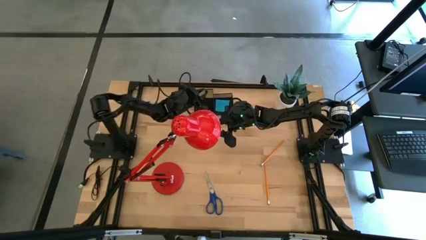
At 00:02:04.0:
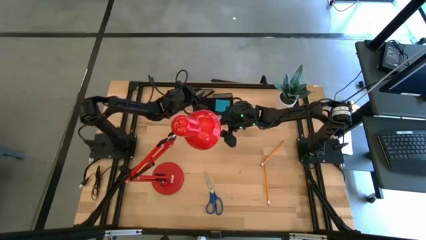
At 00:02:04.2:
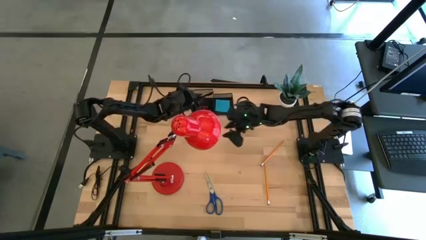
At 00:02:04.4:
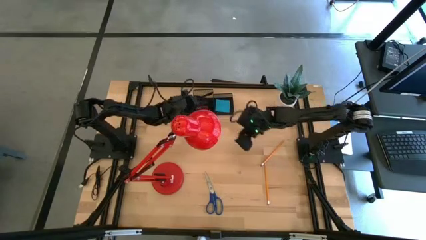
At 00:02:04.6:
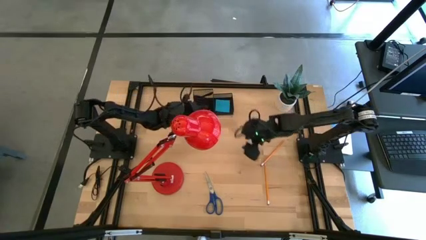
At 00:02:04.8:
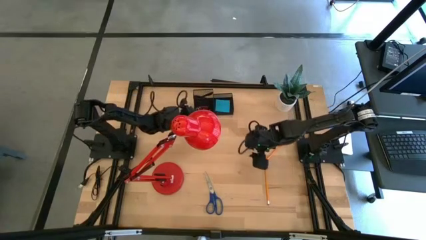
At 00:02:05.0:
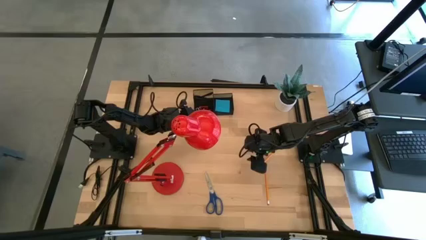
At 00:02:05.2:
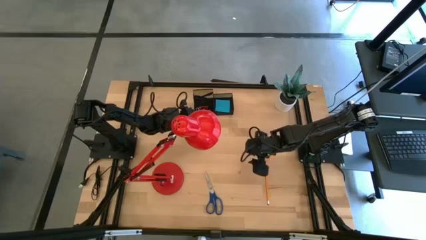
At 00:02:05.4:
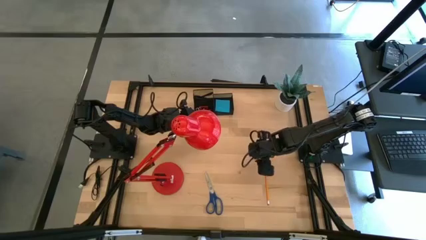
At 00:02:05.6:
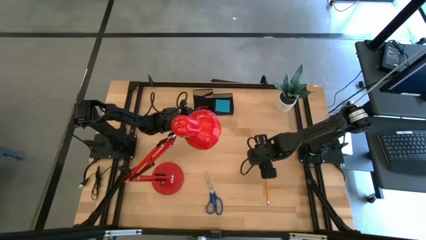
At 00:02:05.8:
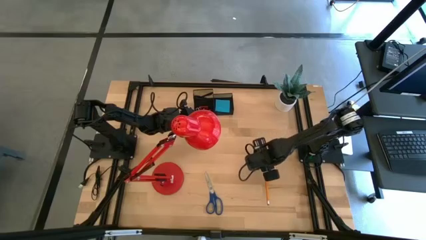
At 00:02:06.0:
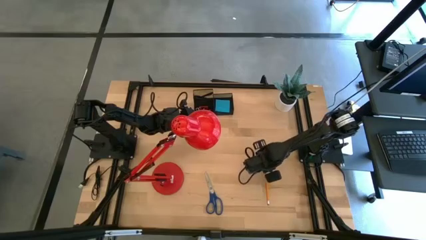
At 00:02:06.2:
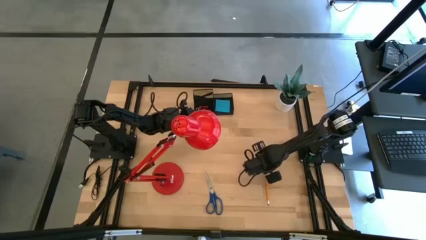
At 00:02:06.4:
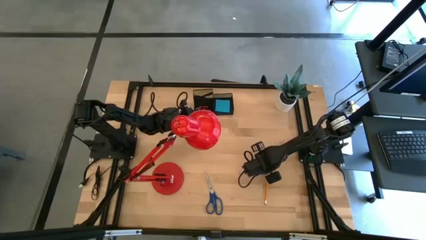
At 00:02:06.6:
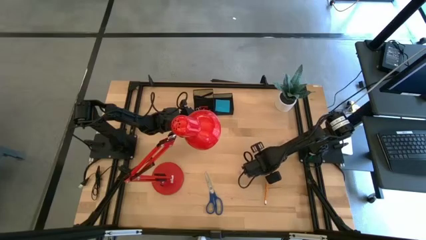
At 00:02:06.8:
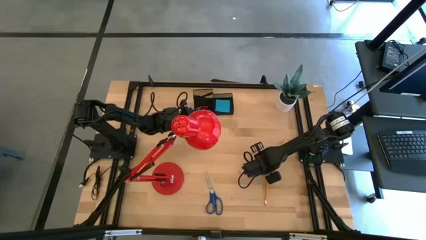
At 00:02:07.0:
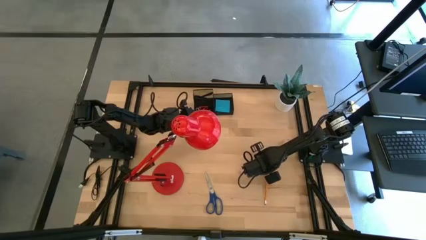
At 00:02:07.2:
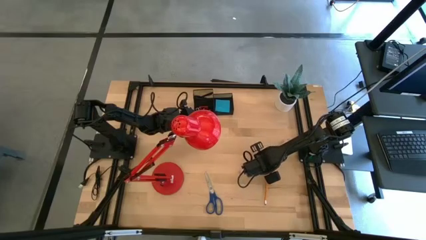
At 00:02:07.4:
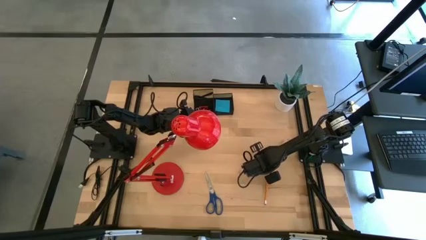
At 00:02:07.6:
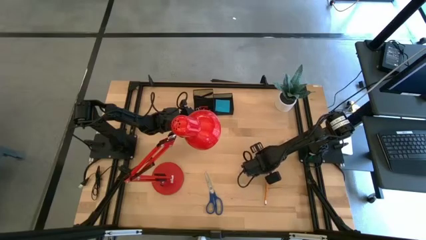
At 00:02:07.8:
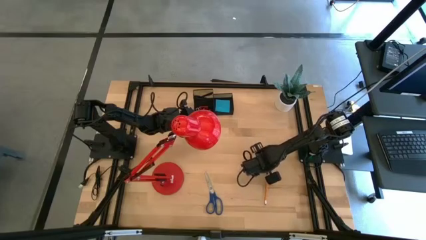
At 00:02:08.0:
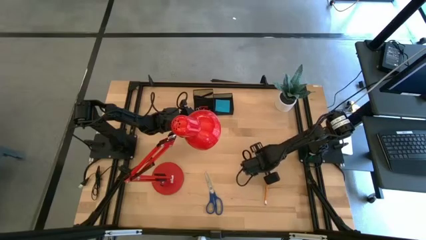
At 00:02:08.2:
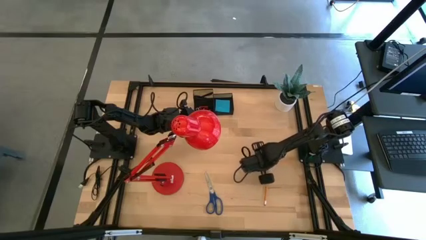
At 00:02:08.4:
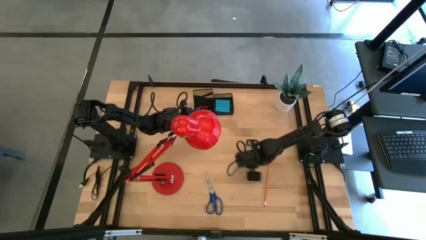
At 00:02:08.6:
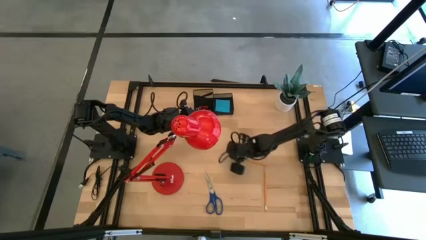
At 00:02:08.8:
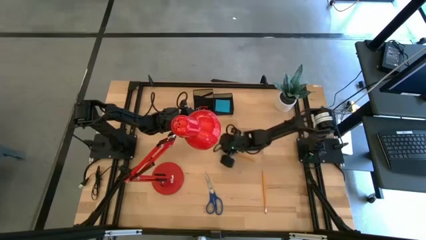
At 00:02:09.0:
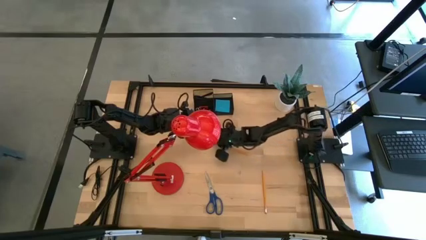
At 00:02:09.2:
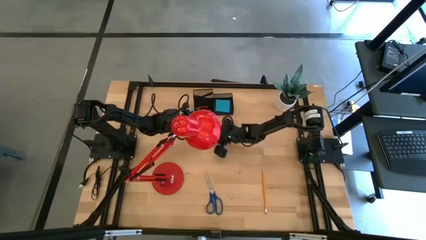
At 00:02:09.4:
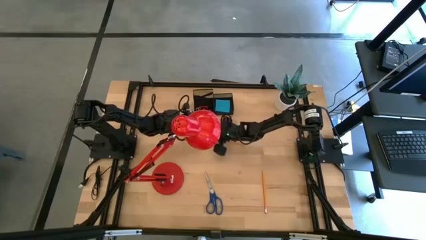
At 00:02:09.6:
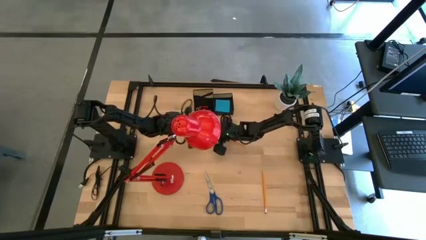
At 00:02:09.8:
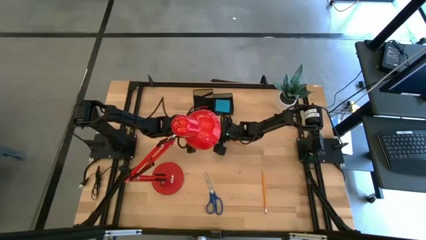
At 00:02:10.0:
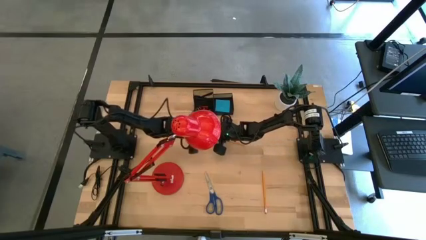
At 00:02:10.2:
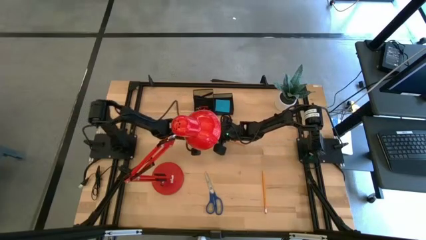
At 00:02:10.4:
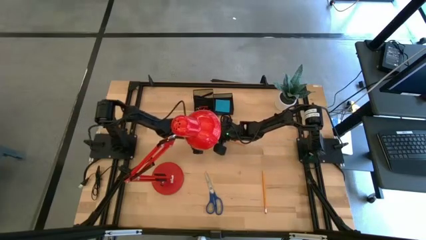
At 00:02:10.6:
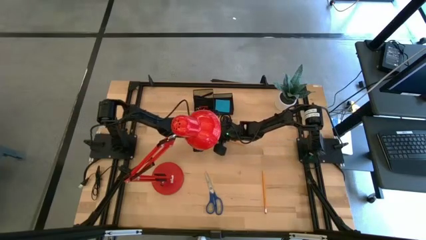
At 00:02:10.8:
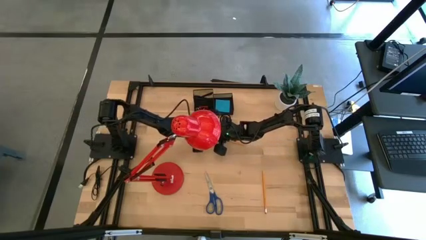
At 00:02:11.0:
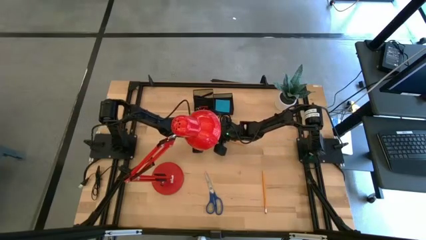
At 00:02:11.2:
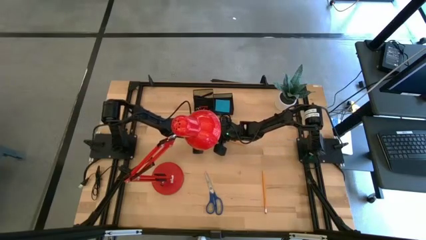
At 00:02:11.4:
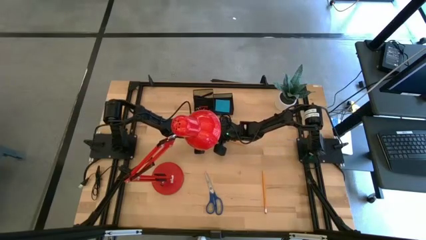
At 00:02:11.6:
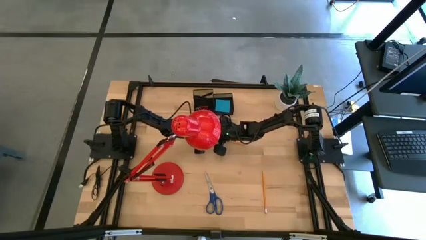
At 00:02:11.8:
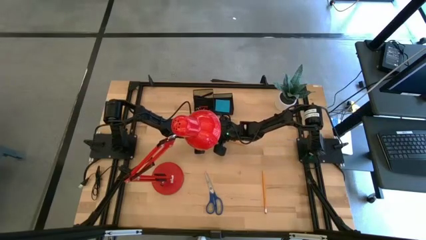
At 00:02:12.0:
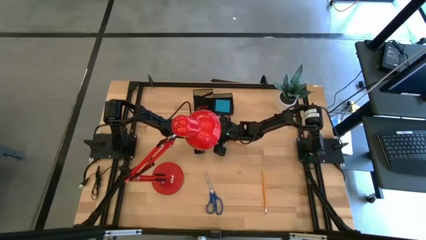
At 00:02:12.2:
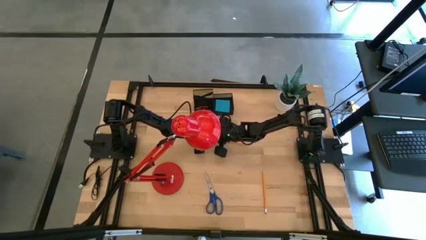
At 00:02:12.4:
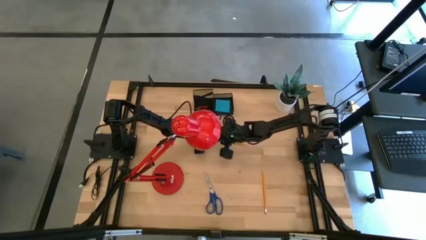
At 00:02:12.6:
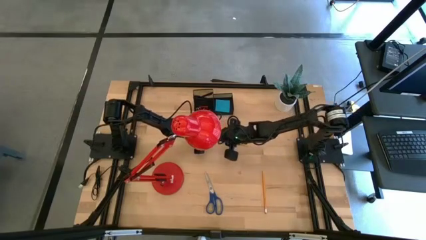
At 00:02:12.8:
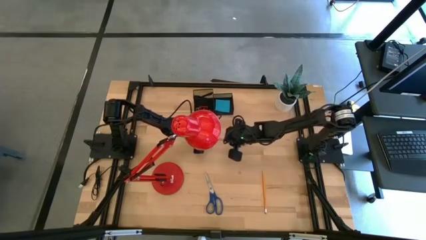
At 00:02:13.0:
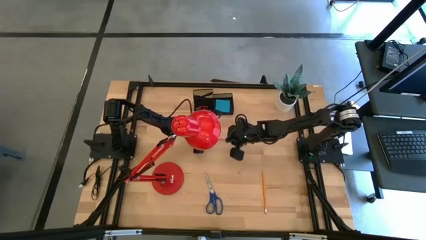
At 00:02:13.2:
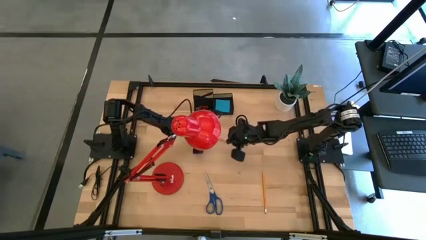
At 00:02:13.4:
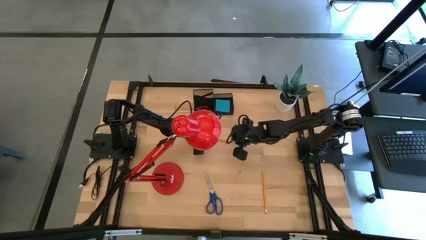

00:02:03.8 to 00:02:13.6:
Task: Pick and place office supplies into organizer
Put the top pencil into the desk organizer
